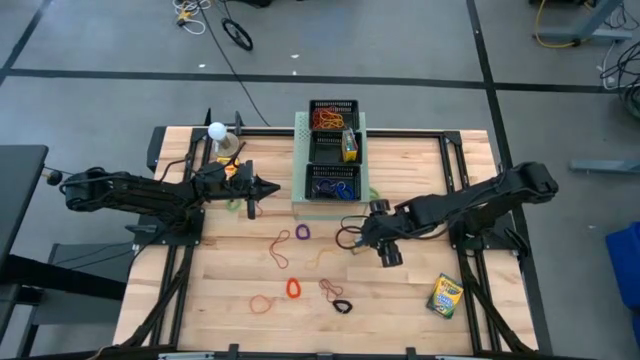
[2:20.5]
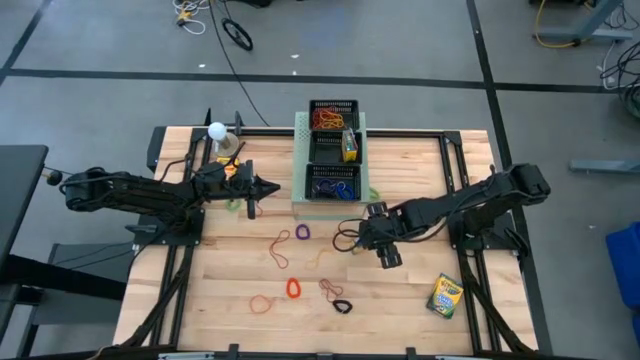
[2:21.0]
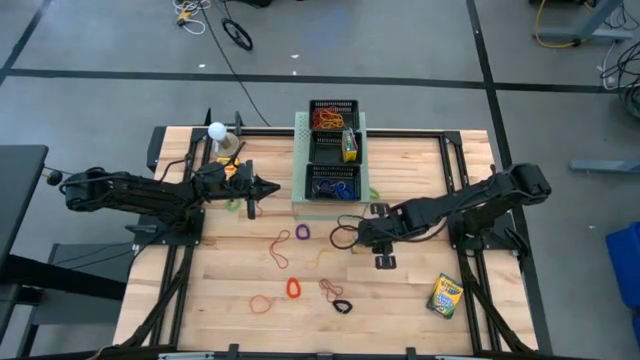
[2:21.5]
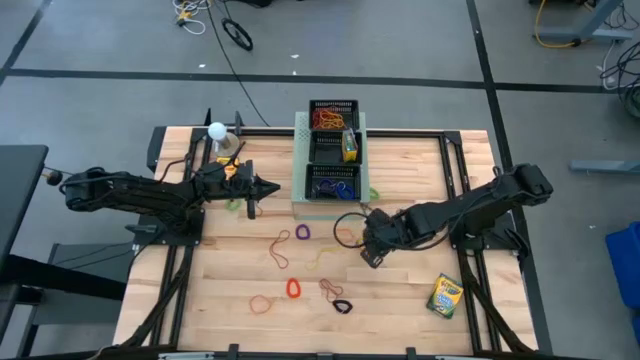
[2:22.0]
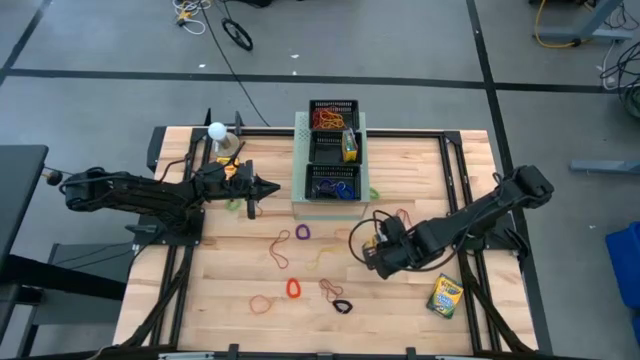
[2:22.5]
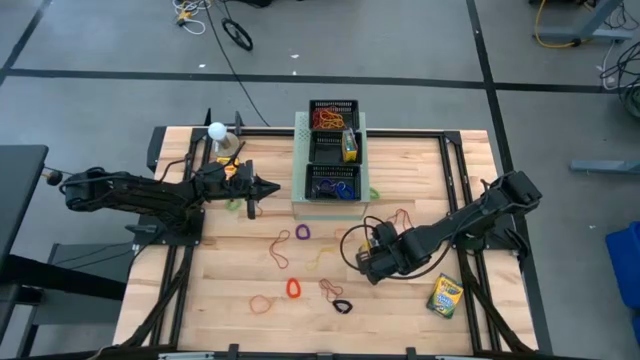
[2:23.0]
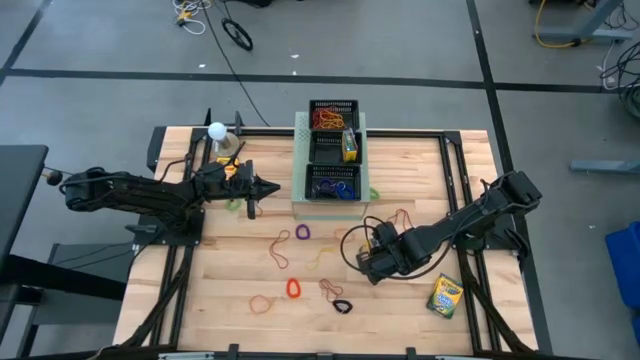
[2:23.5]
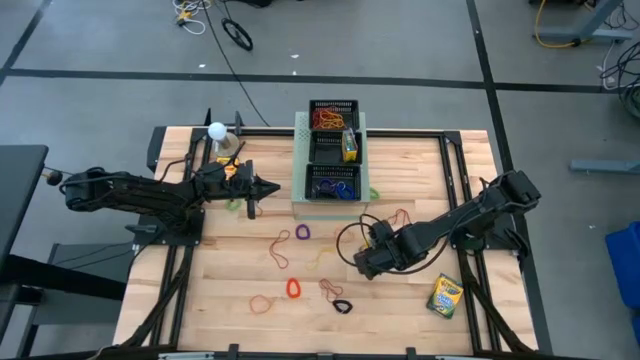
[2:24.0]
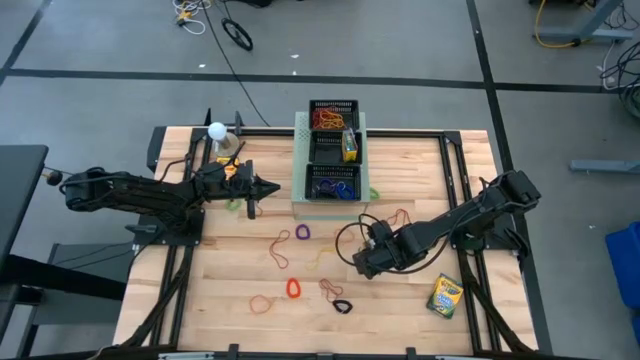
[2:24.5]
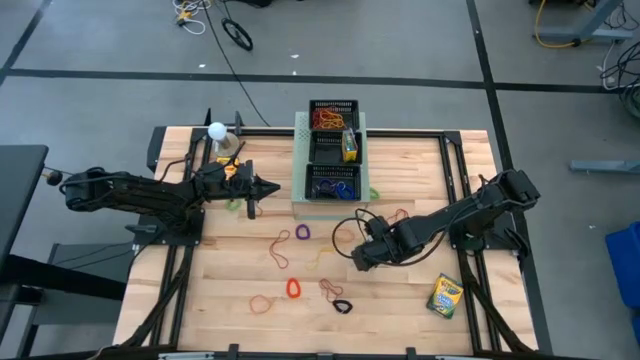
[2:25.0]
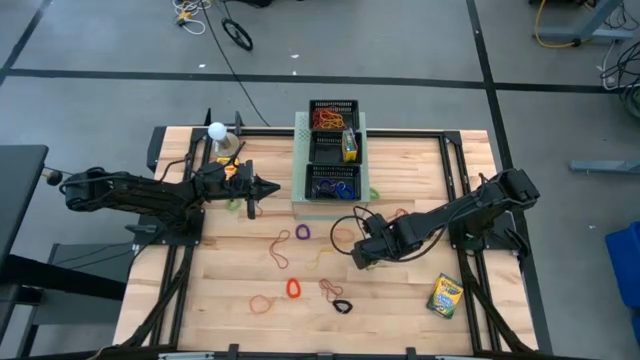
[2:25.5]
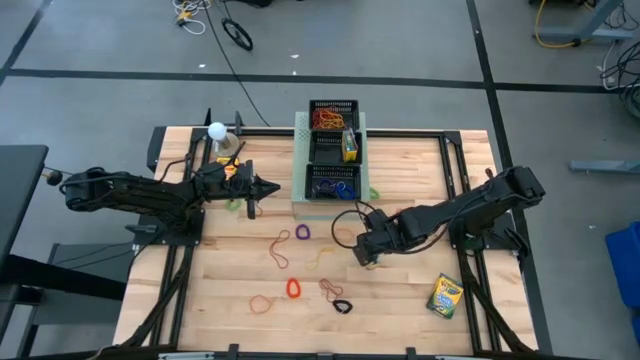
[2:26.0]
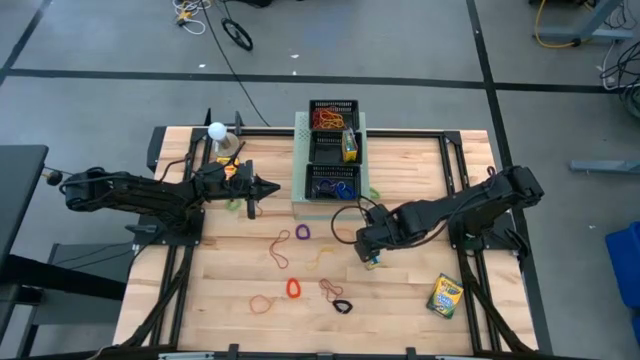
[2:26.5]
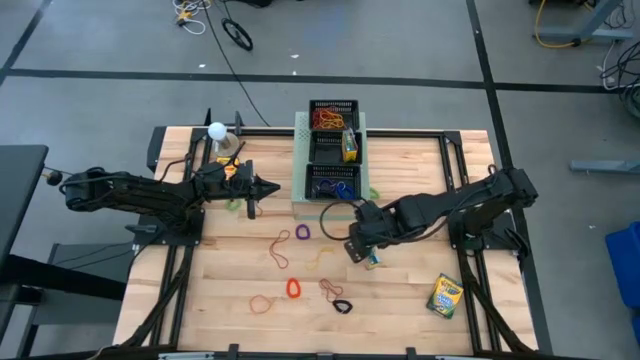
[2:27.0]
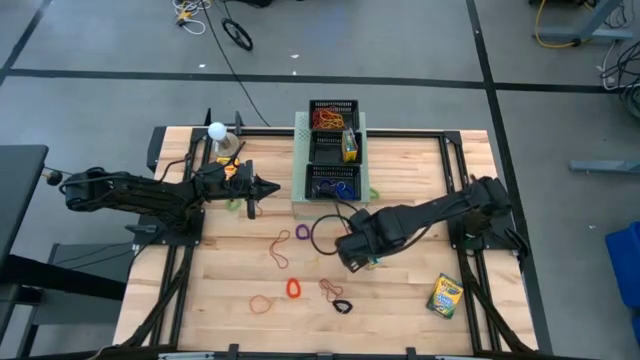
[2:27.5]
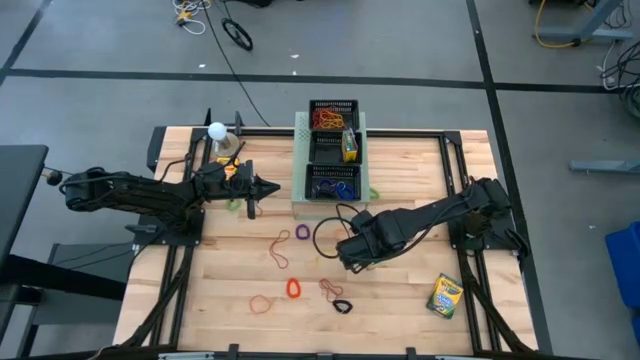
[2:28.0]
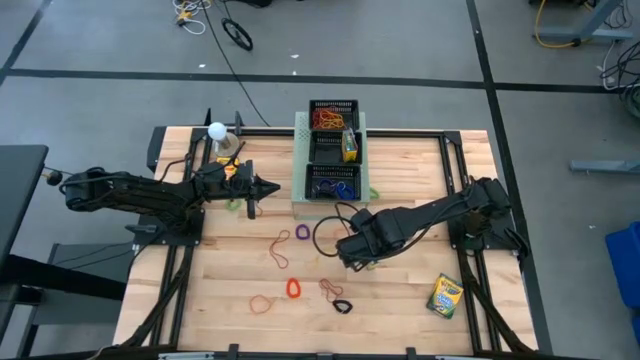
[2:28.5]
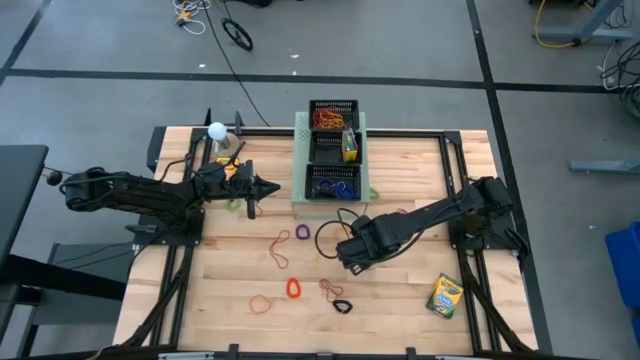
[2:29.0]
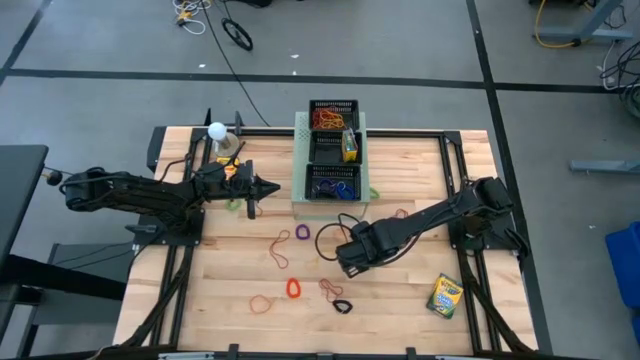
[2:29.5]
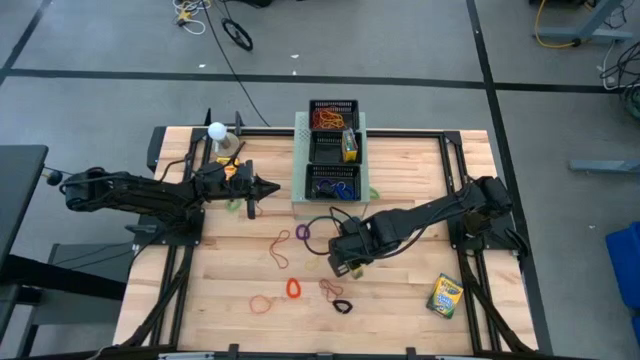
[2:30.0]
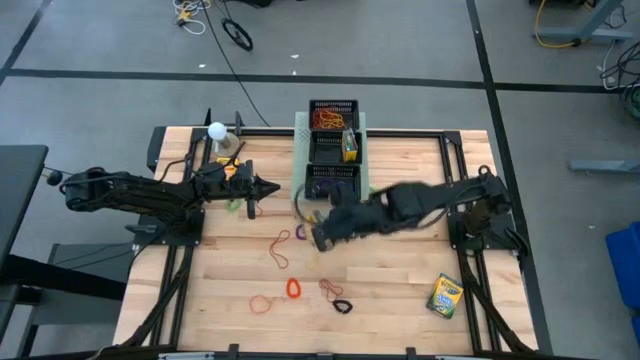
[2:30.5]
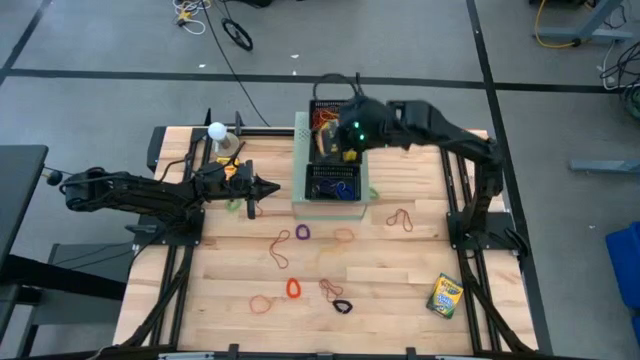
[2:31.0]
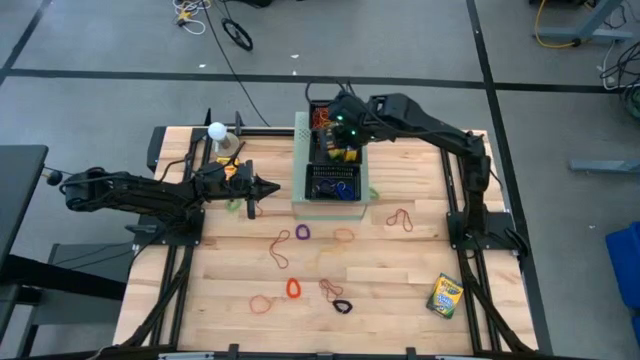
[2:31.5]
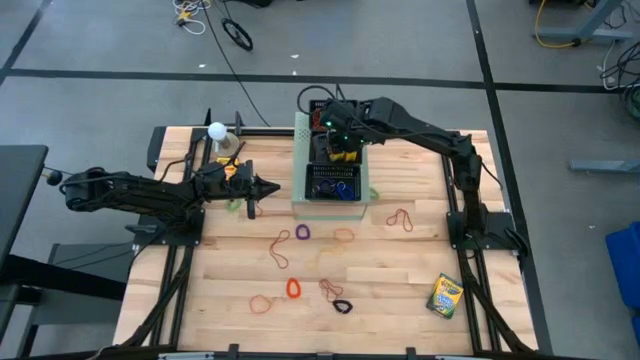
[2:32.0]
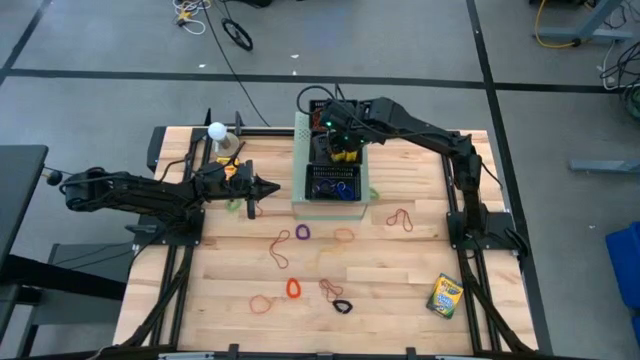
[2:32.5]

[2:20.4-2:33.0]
Task: Pick & Place Office Desk Supplies
Put the top right yellow crayon box into the middle black bin on the shelf

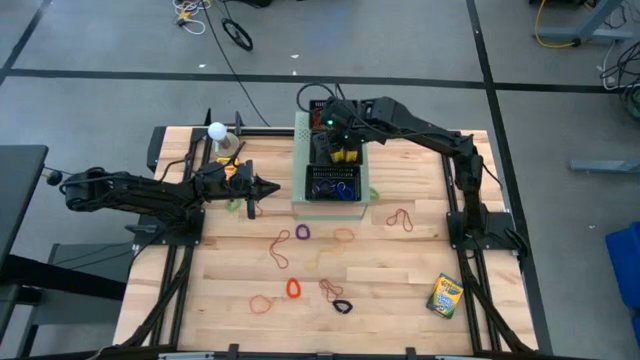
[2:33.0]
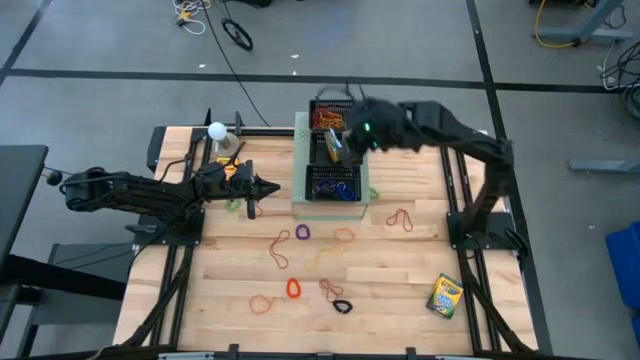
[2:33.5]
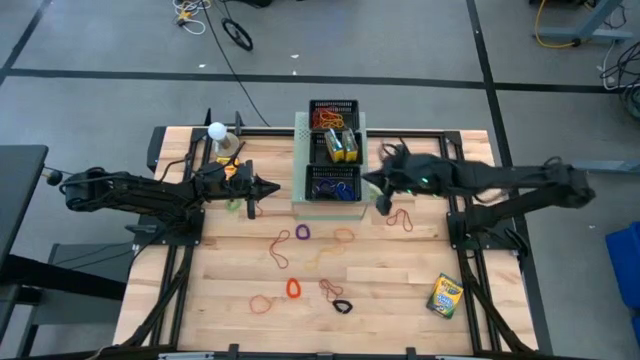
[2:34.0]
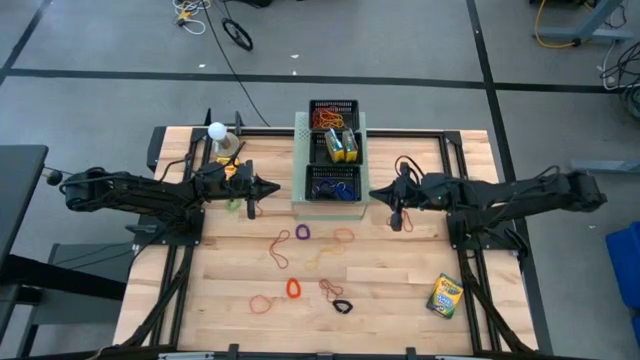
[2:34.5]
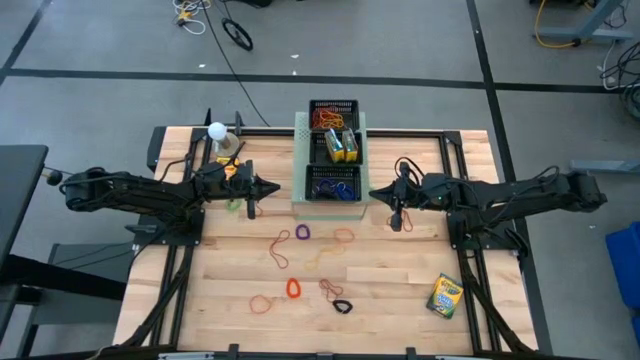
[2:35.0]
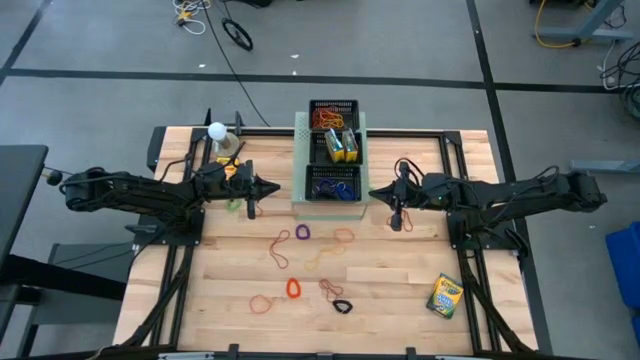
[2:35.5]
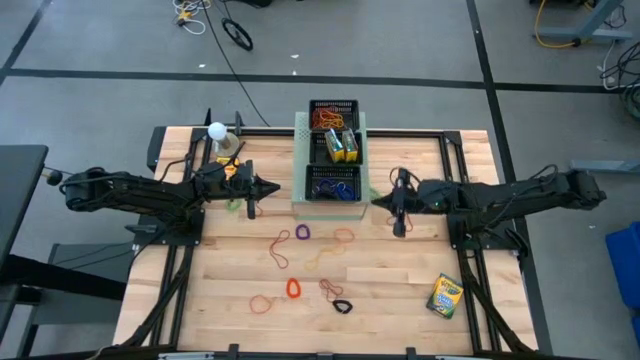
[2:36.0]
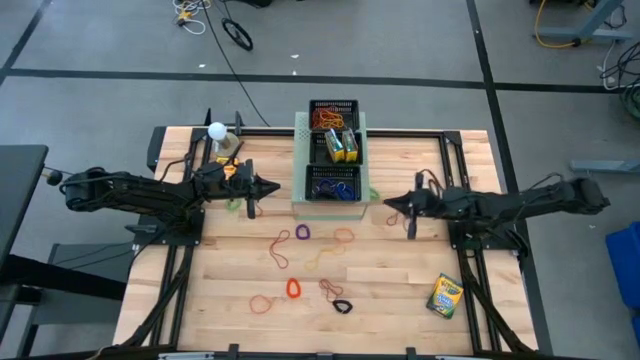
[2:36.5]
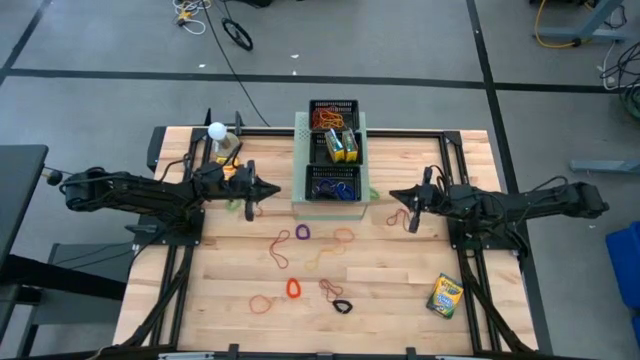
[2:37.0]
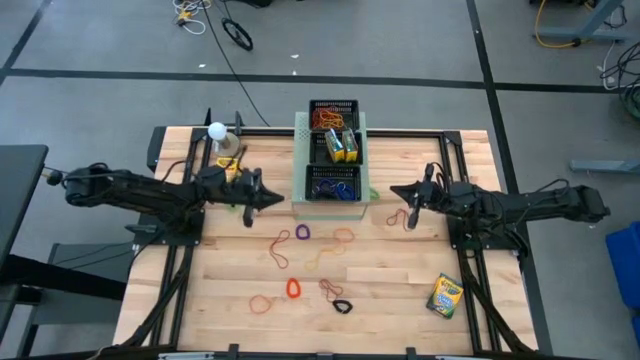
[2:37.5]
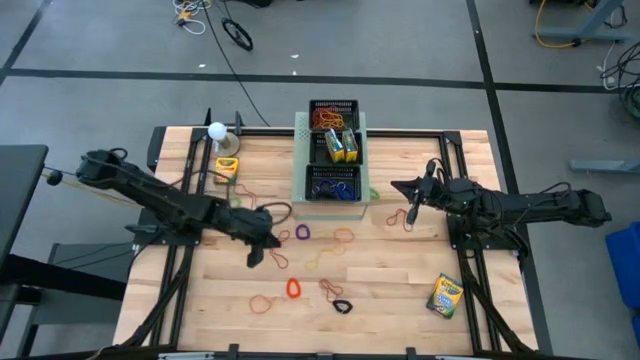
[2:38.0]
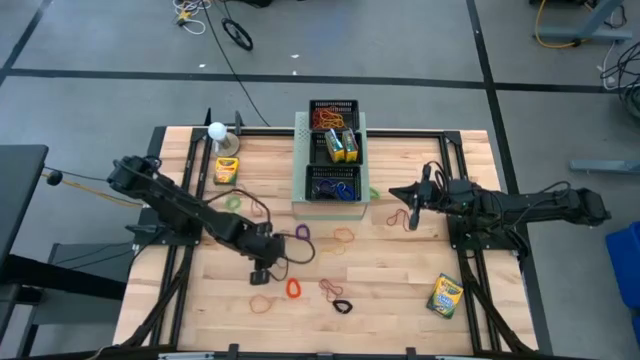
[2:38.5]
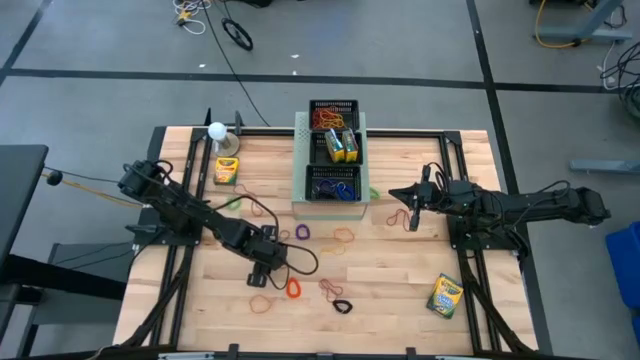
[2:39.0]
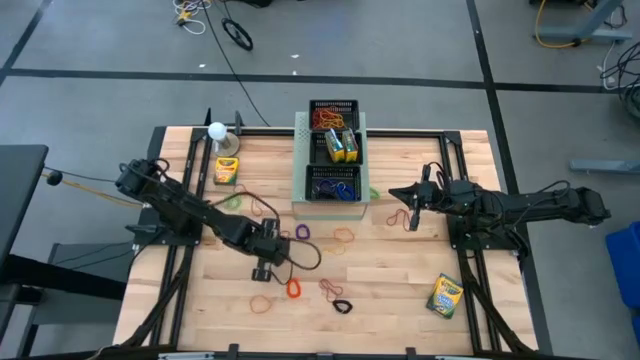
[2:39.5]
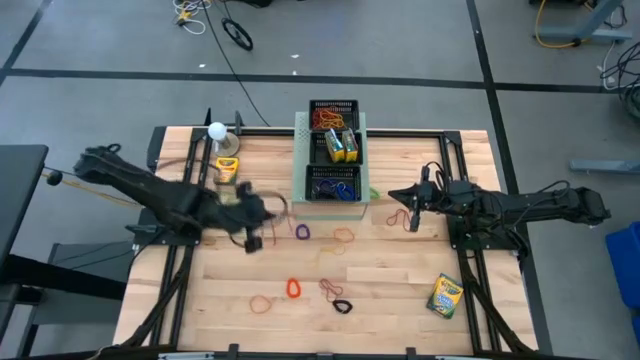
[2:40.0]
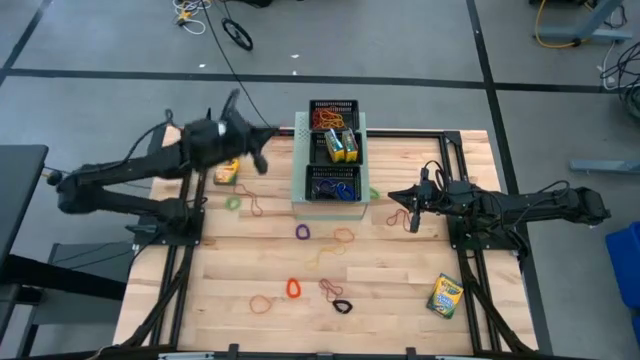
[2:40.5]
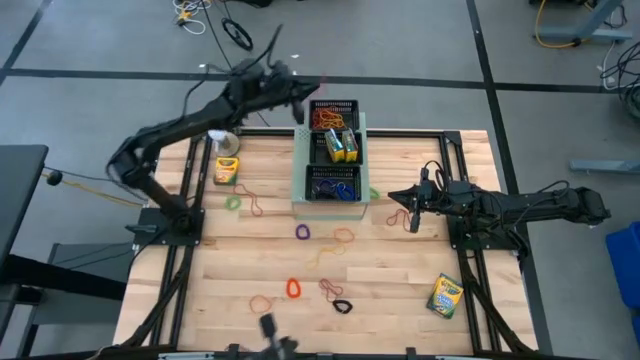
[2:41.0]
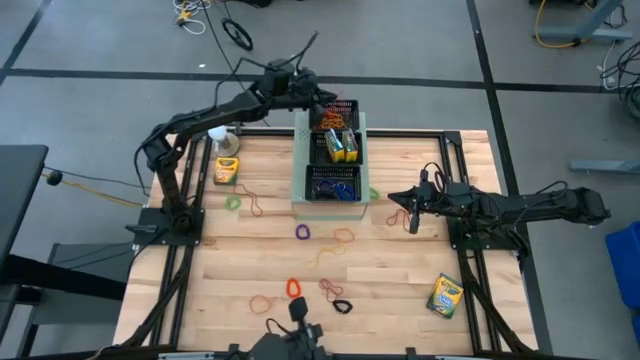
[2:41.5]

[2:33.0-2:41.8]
Put the red rubber band into the top black bin on the shelf
